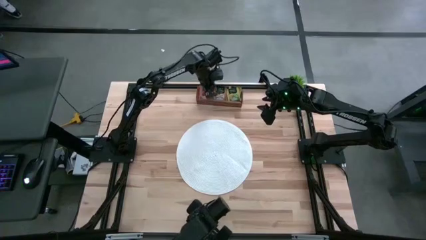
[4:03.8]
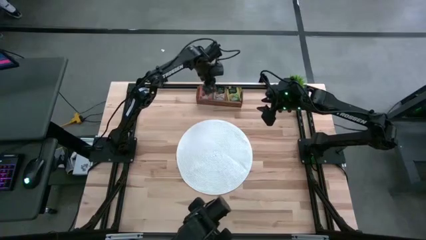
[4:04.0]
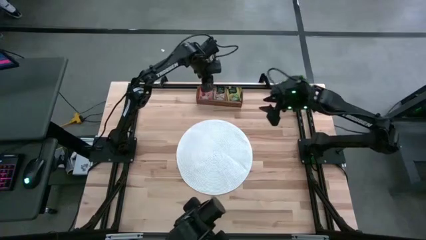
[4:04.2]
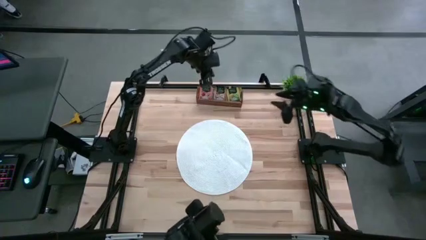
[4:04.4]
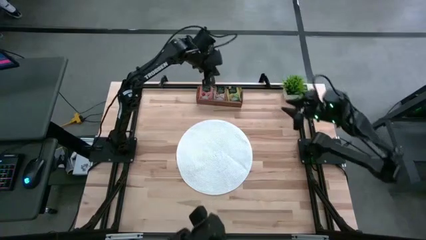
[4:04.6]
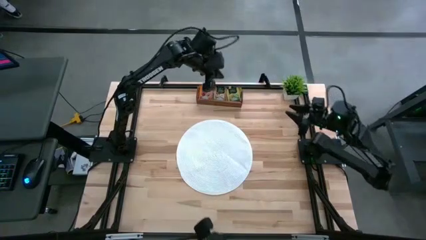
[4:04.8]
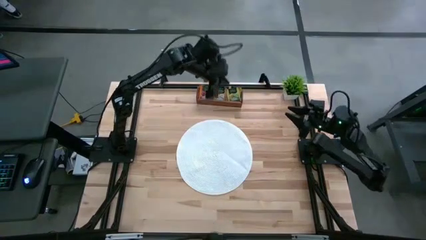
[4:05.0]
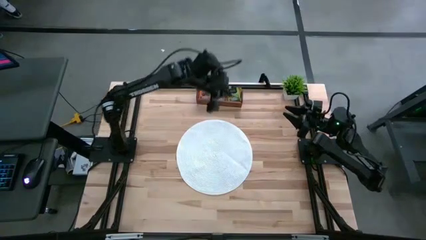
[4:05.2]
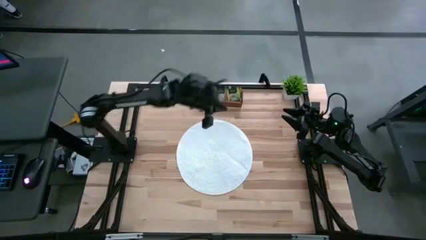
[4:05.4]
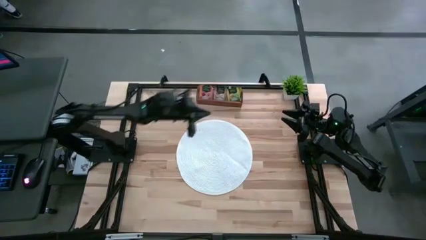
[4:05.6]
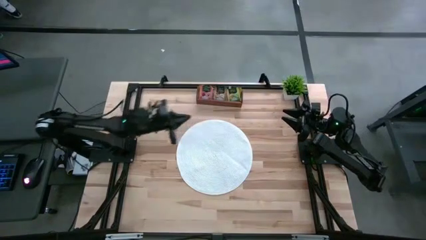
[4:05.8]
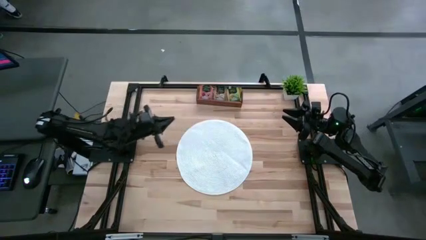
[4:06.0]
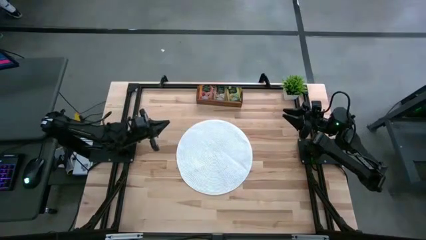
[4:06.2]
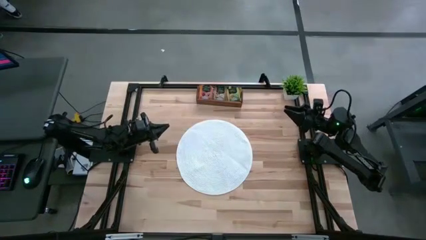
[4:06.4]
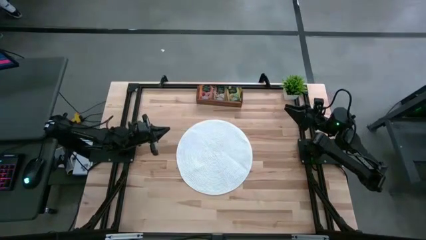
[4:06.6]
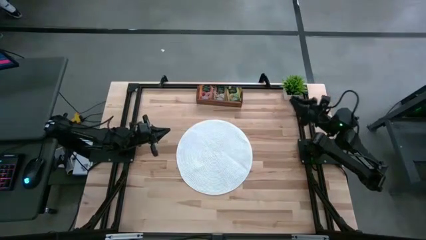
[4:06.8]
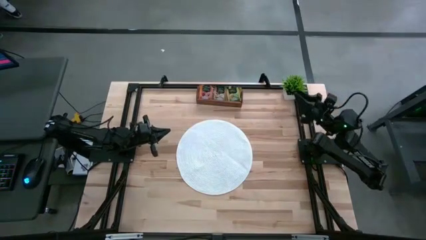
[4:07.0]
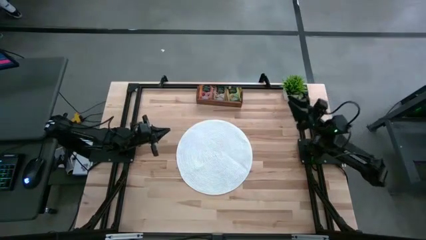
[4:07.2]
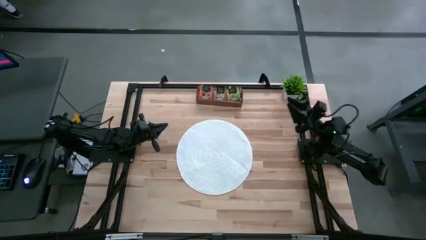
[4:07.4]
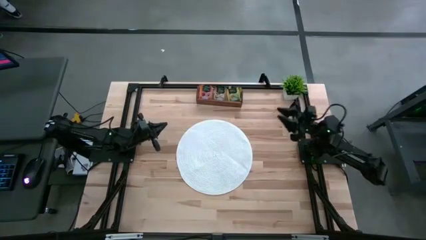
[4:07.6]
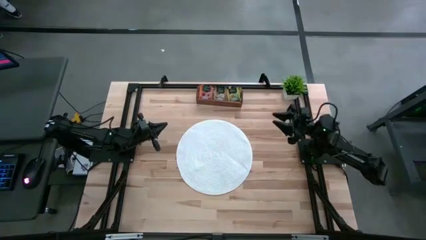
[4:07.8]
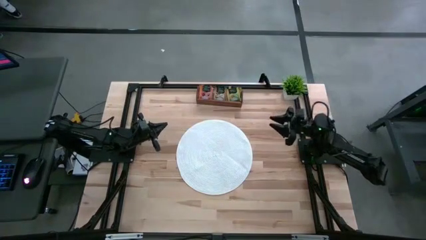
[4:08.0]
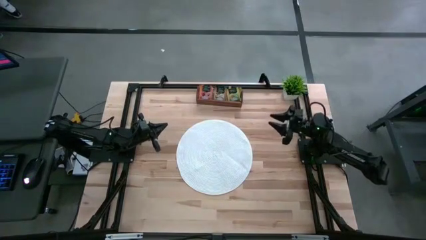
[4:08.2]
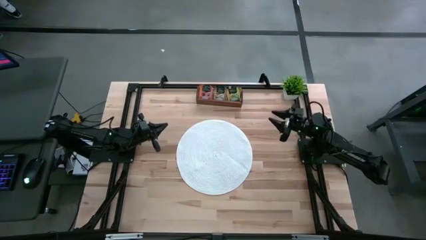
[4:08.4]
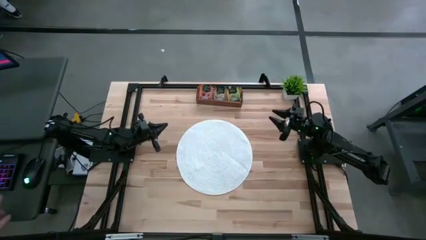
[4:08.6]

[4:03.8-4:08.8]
Task: Pick & Place Tea
Return to Home Position

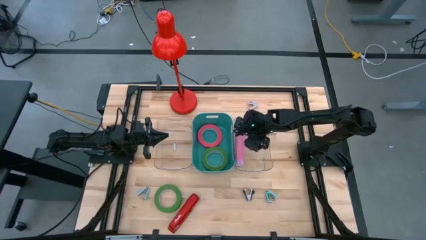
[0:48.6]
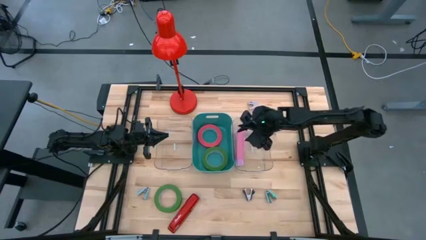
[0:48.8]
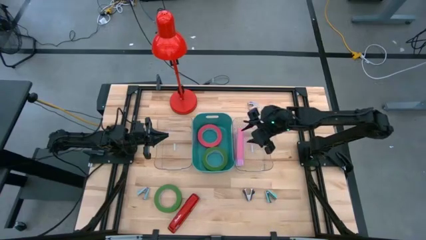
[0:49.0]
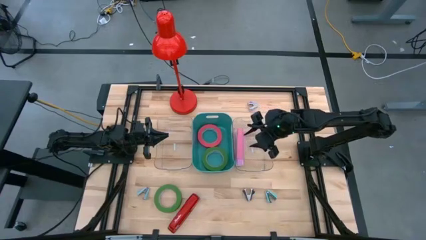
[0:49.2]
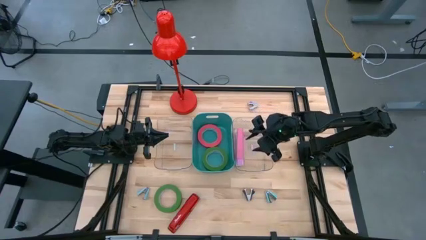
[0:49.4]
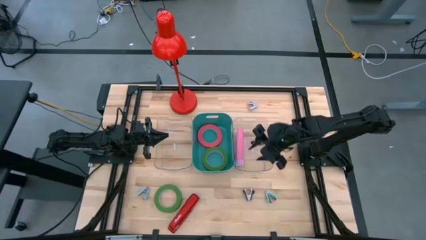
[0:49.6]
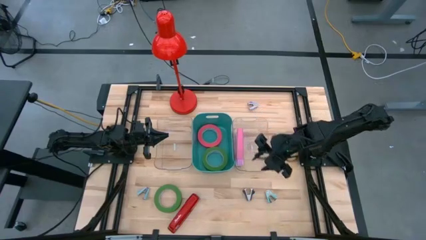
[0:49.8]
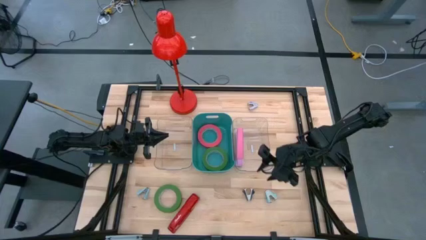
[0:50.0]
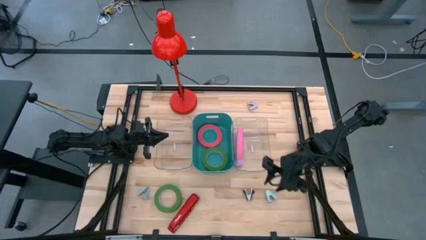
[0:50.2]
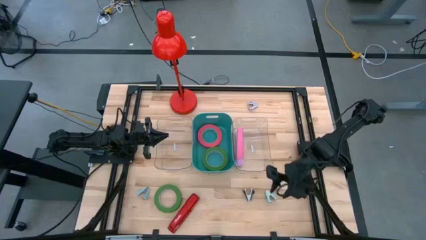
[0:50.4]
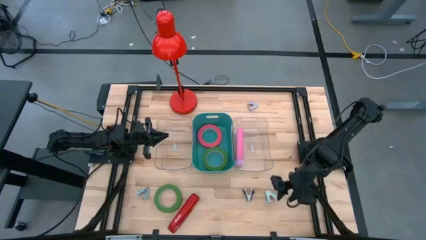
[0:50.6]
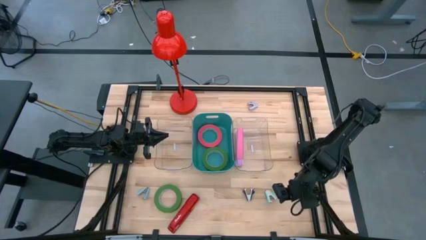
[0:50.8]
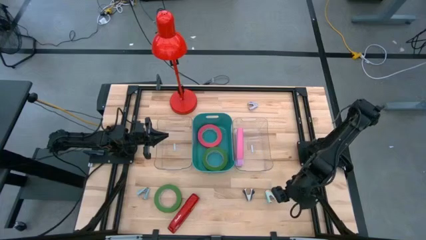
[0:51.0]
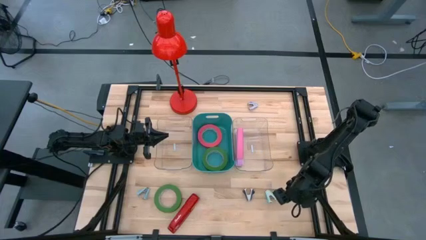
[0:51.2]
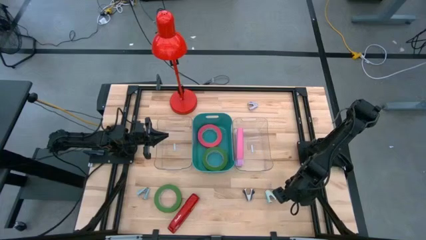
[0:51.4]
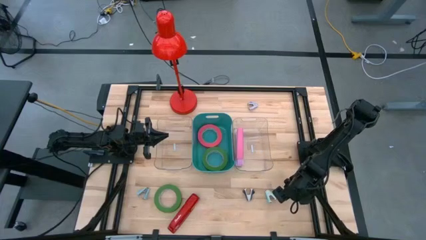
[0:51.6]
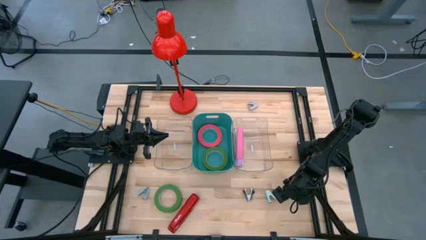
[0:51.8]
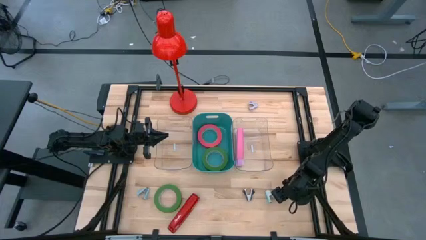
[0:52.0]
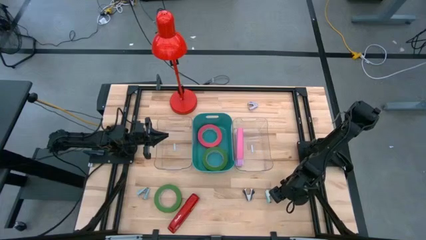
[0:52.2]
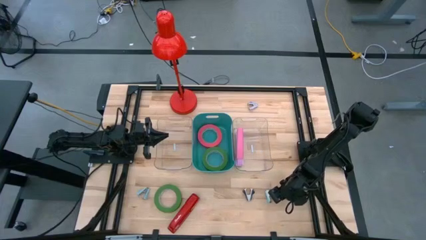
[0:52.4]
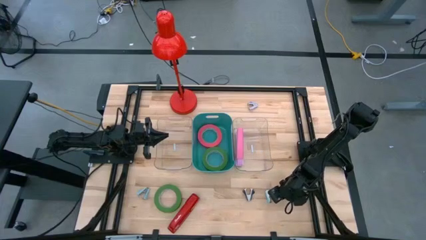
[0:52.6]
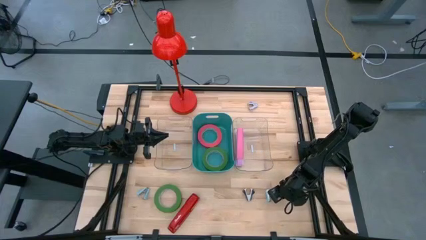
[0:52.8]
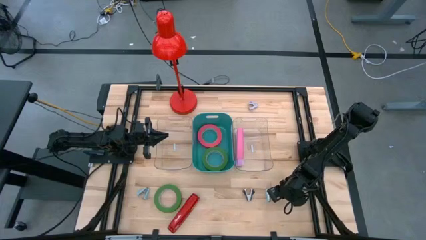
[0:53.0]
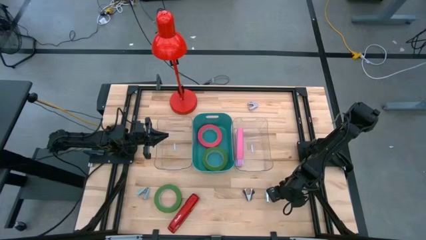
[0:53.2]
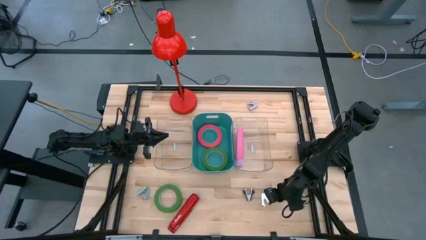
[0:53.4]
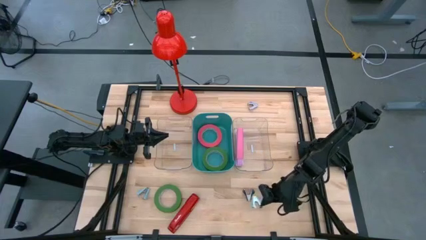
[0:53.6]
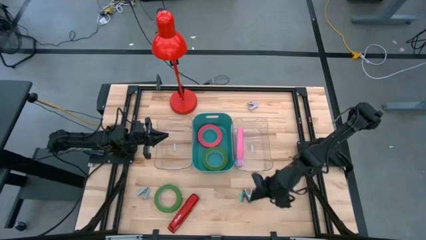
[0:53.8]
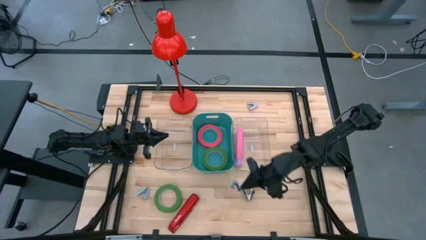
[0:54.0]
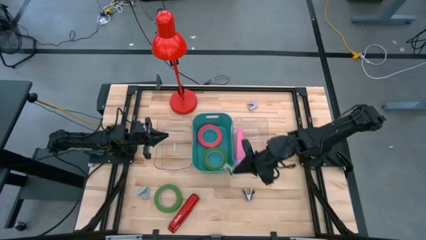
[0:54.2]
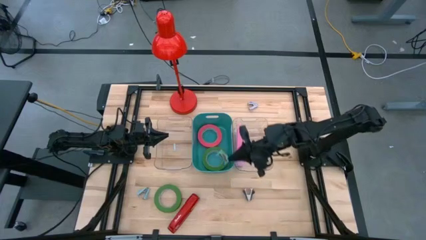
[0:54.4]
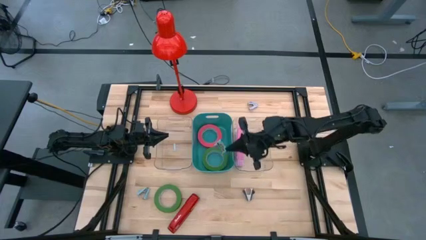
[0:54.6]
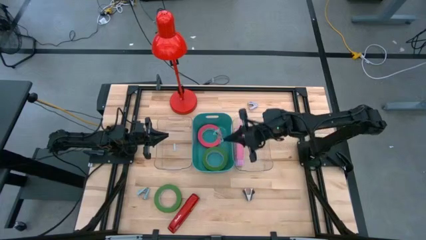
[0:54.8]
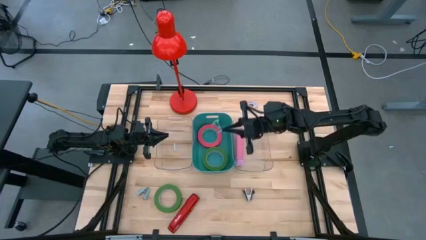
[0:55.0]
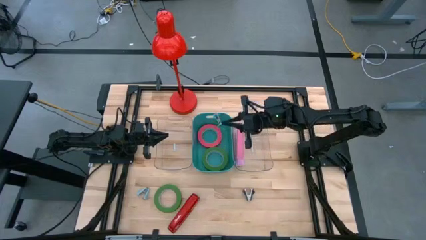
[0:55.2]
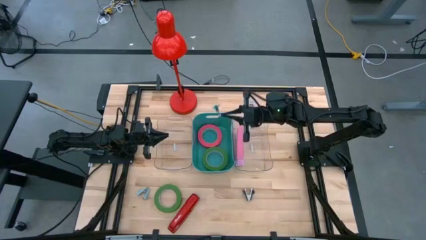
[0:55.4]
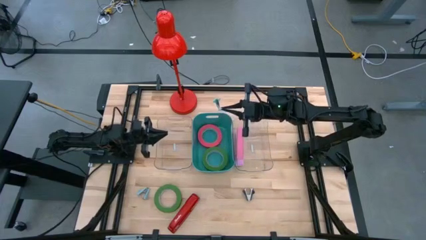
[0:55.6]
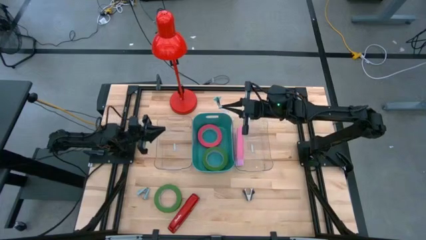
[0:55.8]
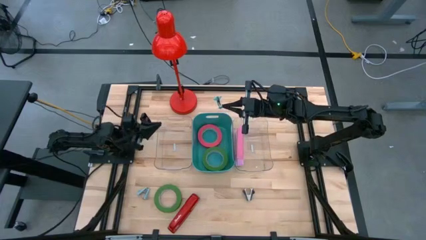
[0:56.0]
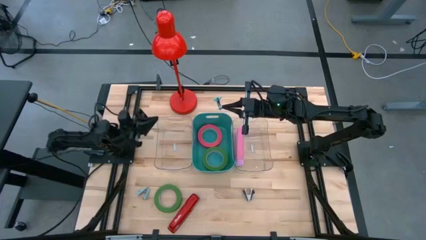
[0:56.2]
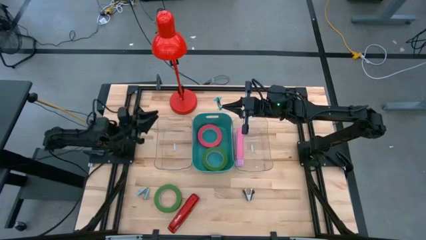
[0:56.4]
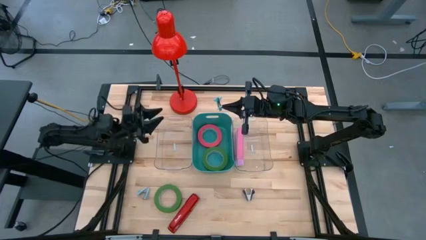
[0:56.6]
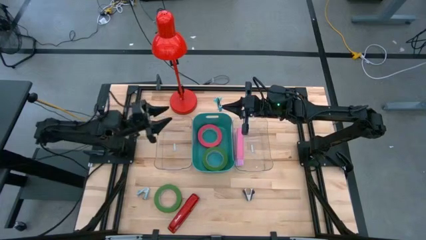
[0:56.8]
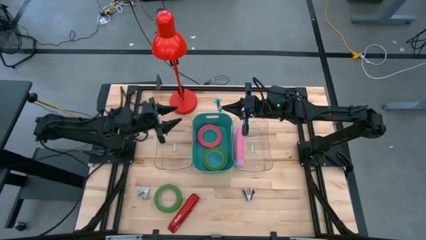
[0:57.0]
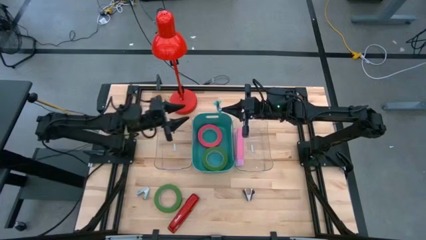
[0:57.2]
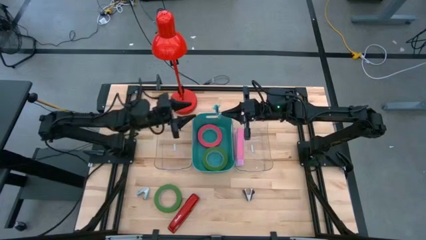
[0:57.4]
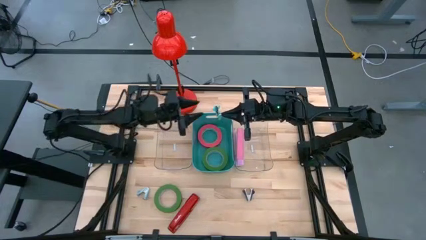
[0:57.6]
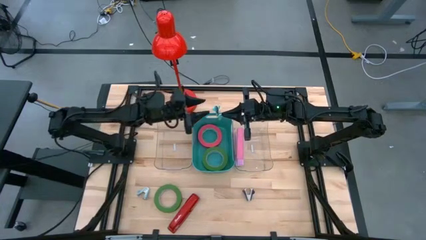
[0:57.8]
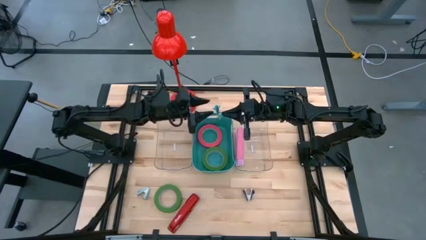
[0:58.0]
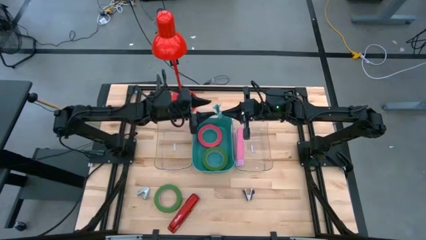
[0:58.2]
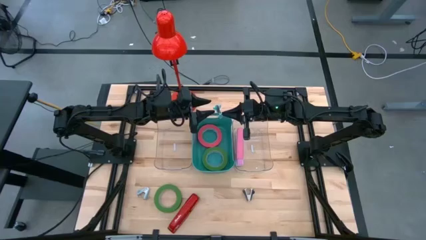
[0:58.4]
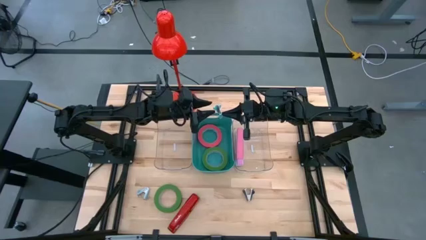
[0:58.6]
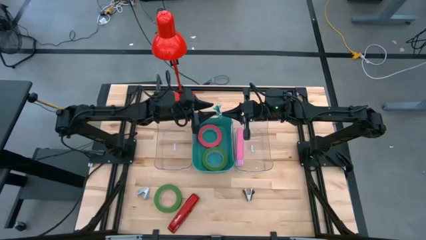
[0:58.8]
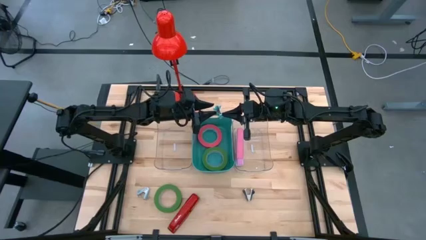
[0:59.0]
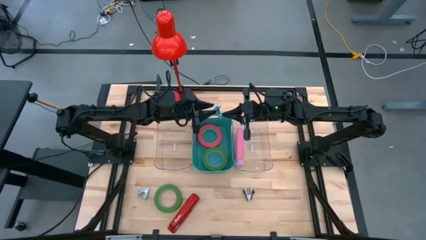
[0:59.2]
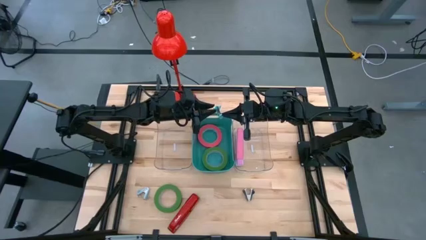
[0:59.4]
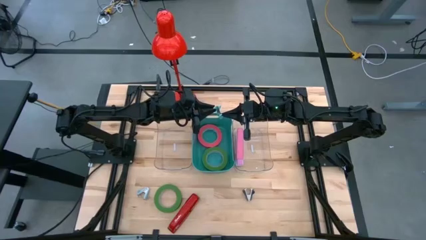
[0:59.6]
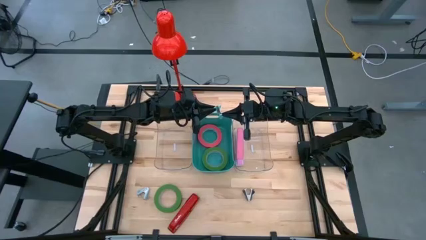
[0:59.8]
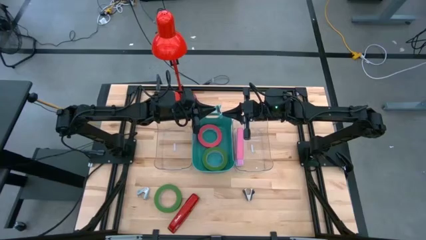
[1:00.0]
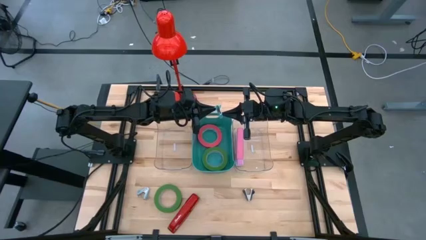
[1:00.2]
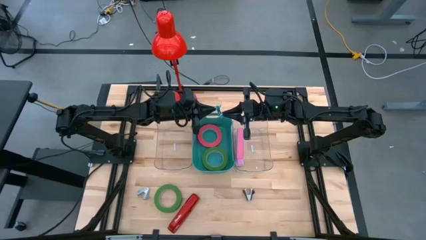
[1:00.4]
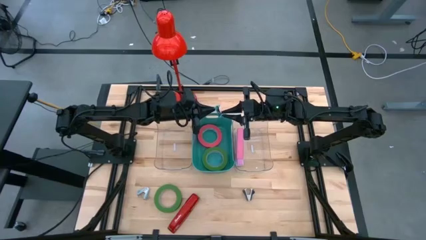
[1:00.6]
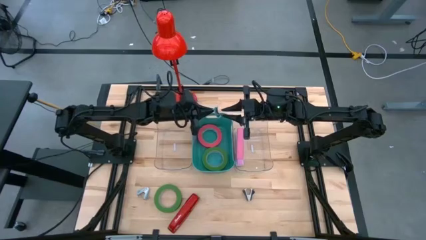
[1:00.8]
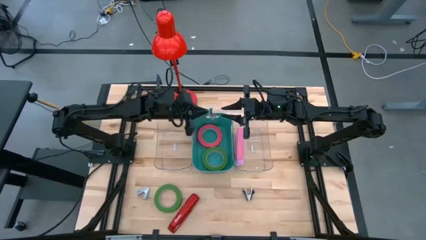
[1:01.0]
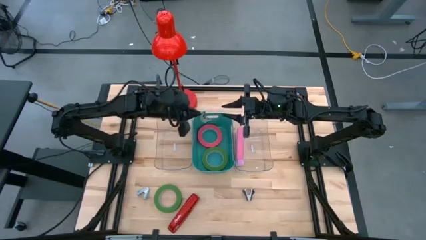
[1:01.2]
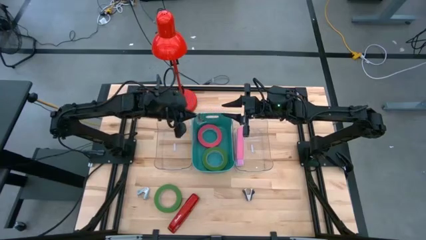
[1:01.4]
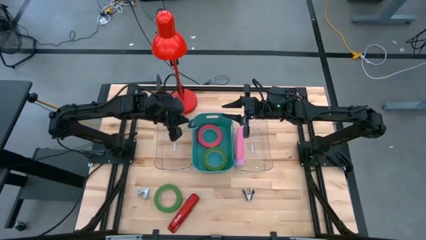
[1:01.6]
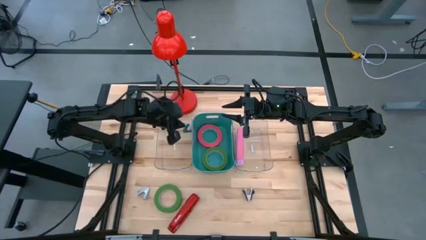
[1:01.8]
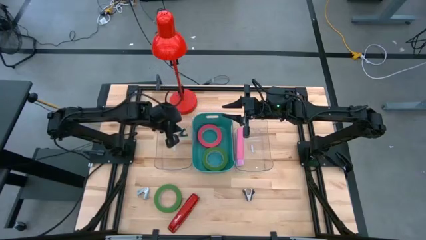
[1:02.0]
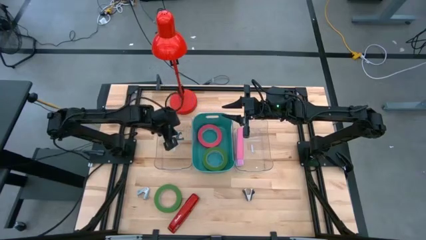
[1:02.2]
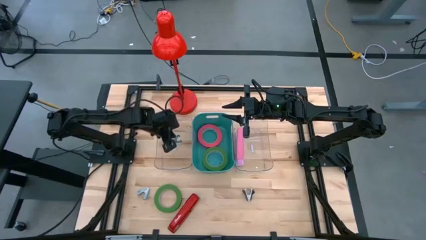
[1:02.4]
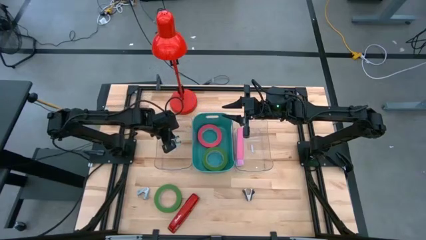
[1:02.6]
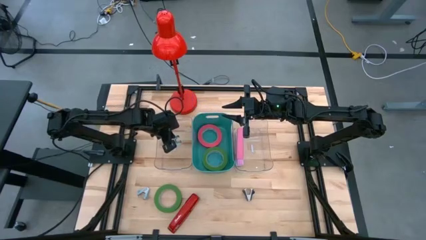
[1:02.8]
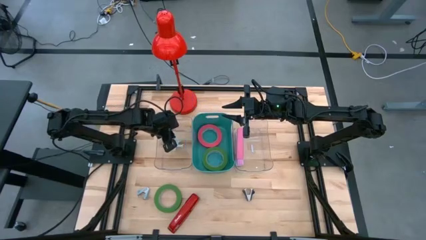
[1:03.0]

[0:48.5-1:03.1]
Task: Pick and place Stapler, Stapler remover, tape
Put the right light blue stapler remover into the left transparent bin
